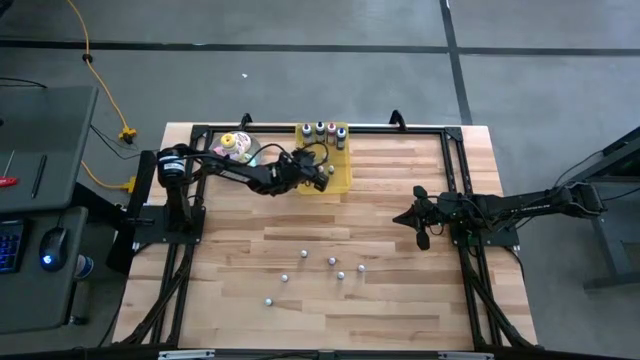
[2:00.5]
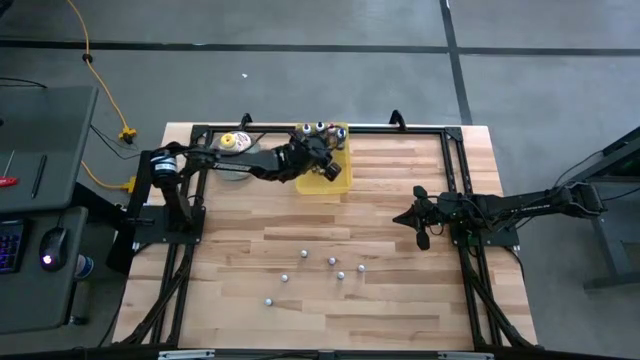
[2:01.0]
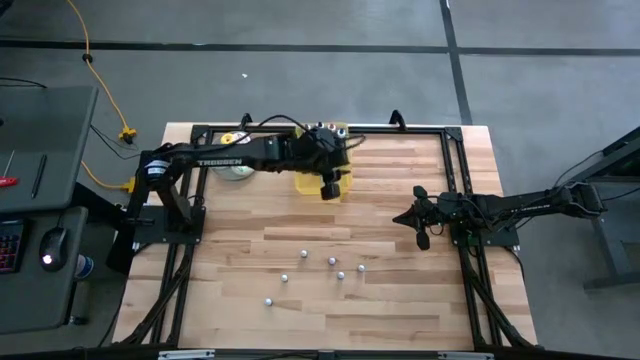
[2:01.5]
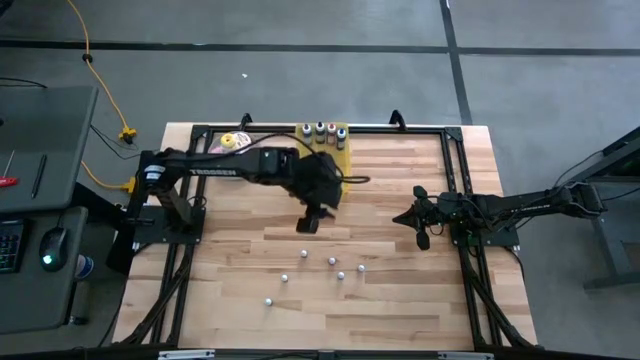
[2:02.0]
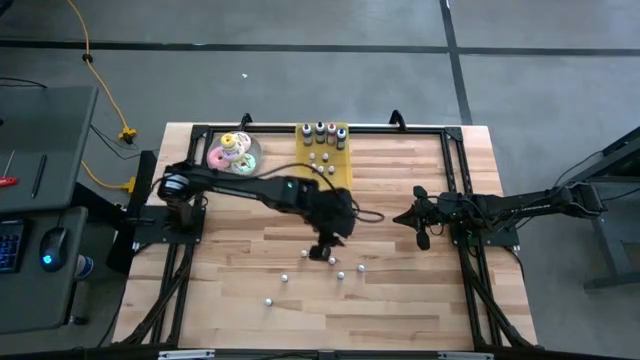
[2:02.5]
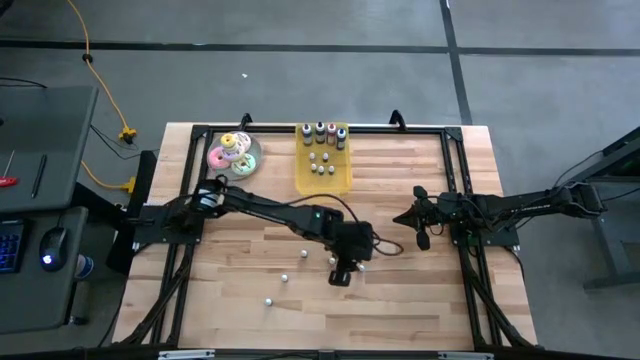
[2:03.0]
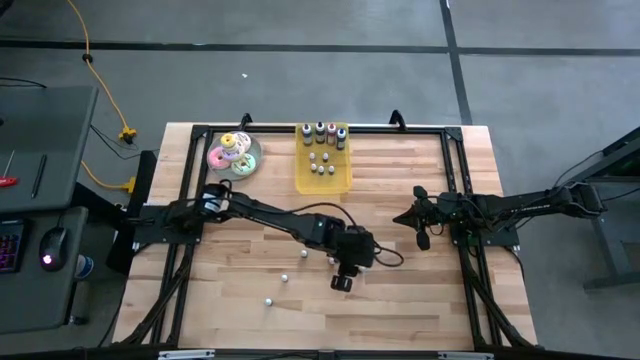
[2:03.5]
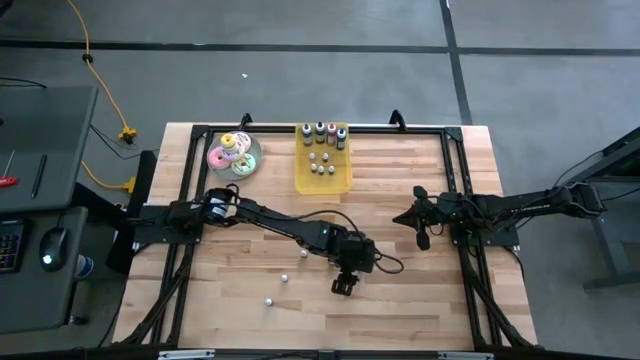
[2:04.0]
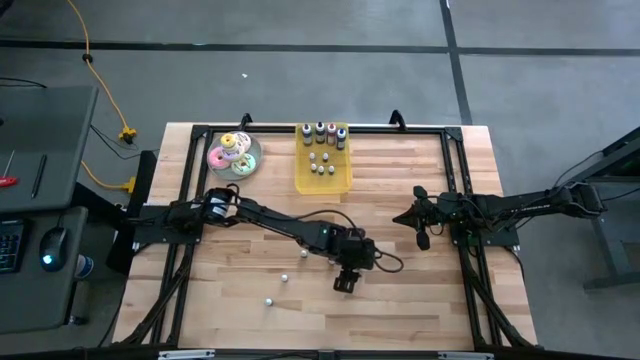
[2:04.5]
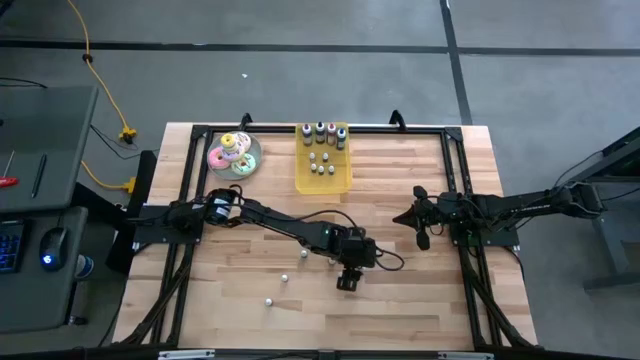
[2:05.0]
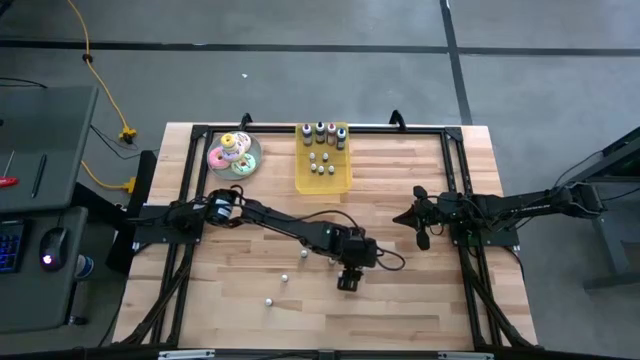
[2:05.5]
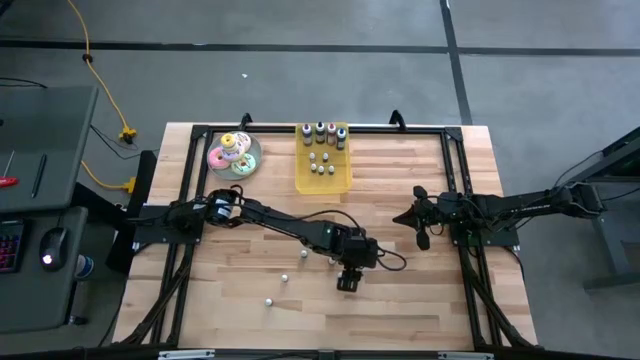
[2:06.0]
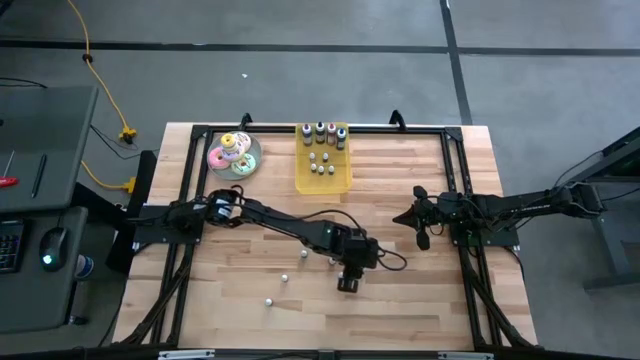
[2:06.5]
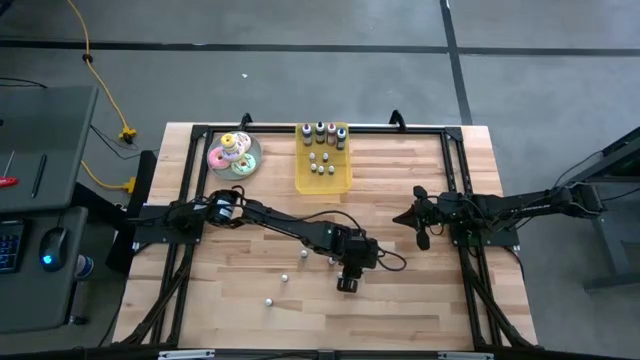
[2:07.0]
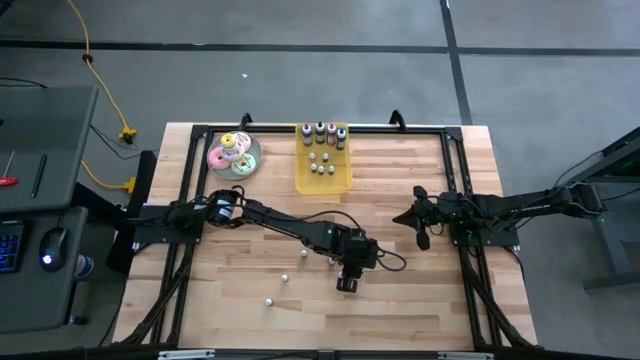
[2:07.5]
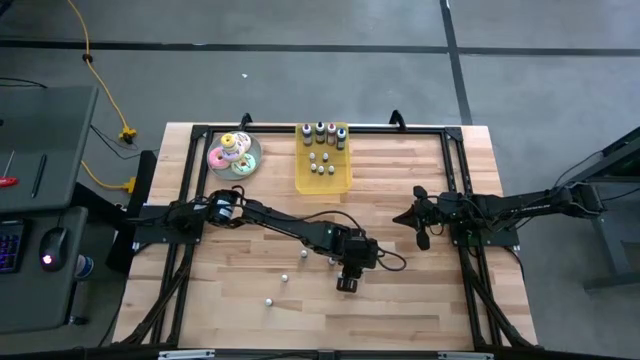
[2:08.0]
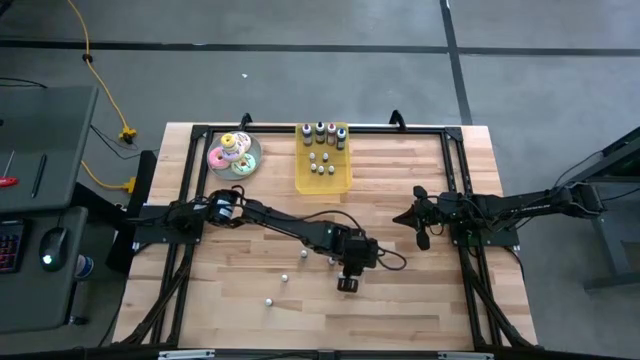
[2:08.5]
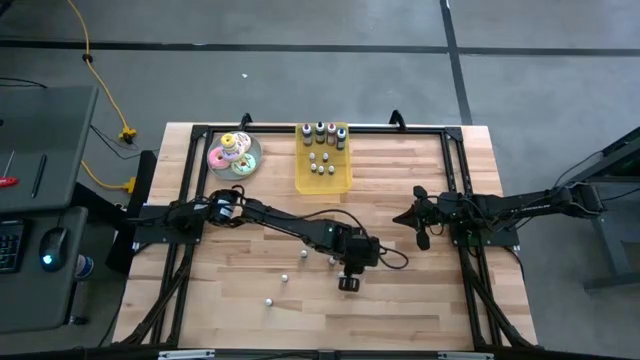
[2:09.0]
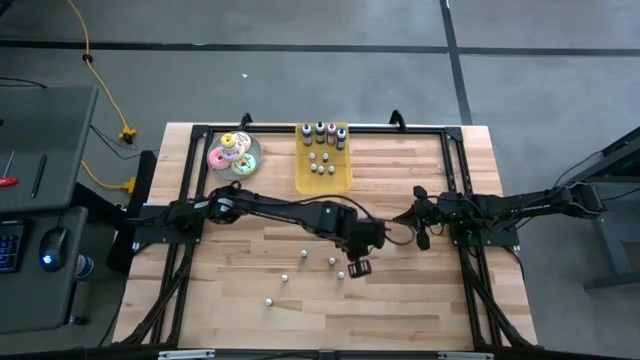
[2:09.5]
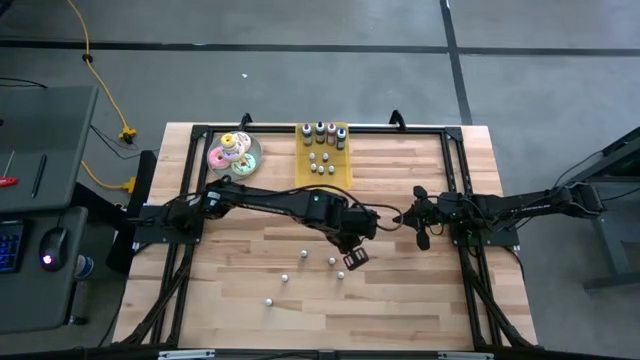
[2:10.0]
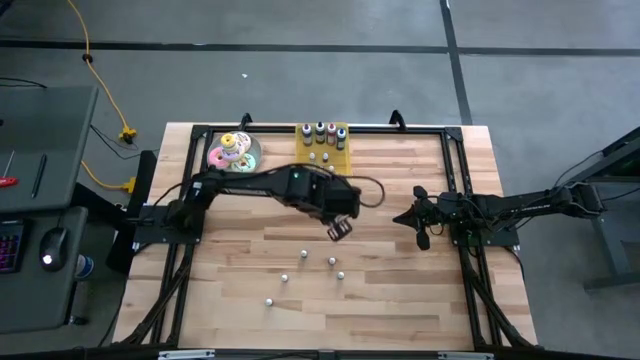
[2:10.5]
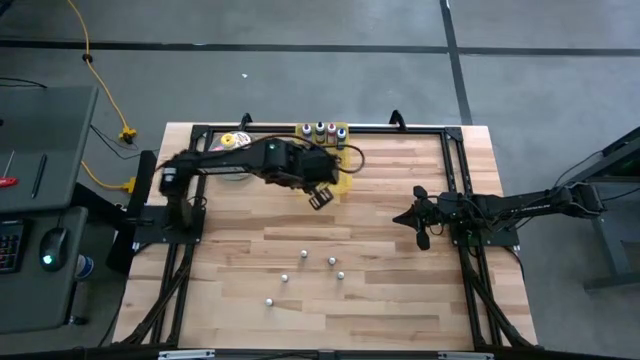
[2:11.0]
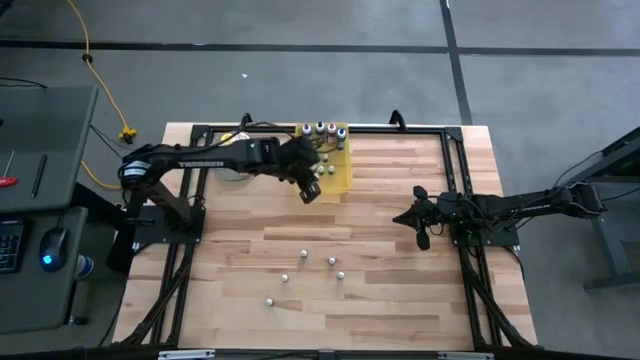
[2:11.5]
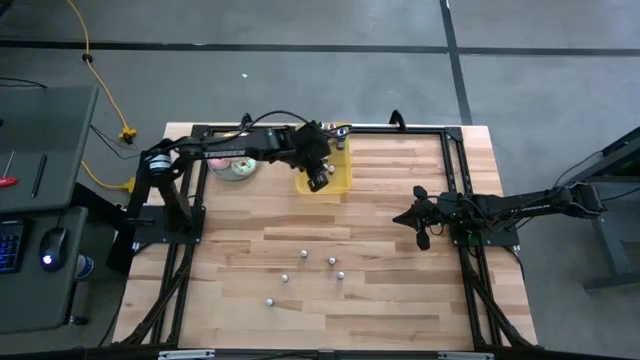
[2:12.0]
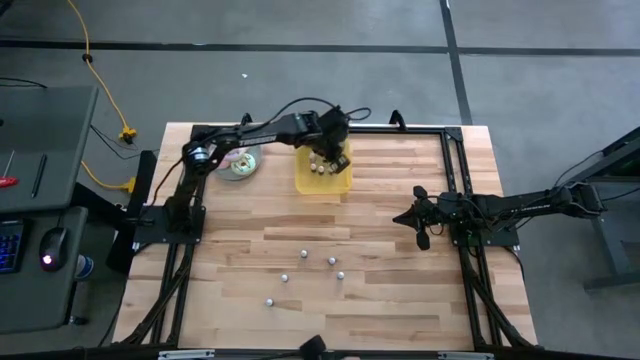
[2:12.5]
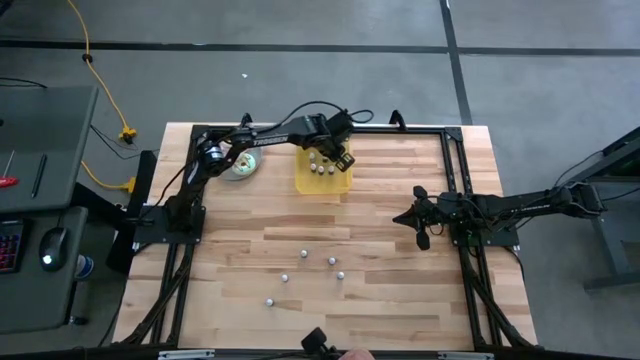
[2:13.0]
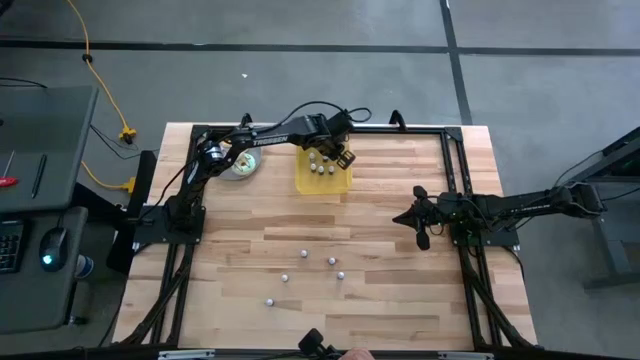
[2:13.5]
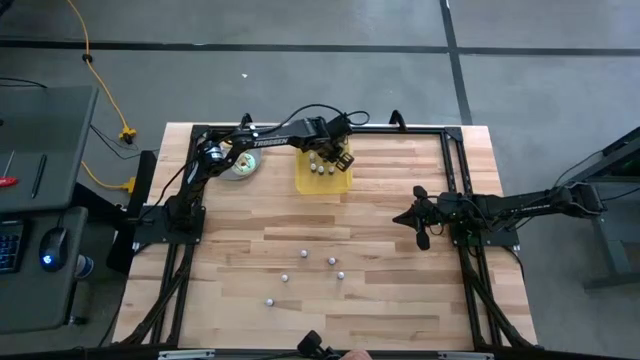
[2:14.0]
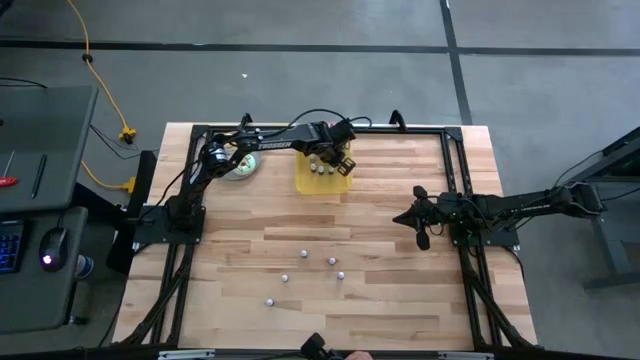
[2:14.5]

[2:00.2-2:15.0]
Task: Pick & Place food coloring
Put the bottom right small light green food coloring bottle into the yellow bin

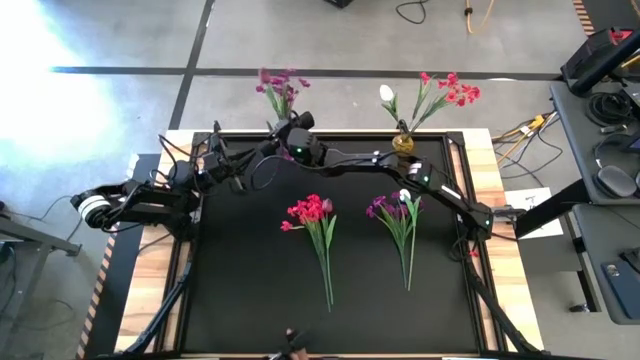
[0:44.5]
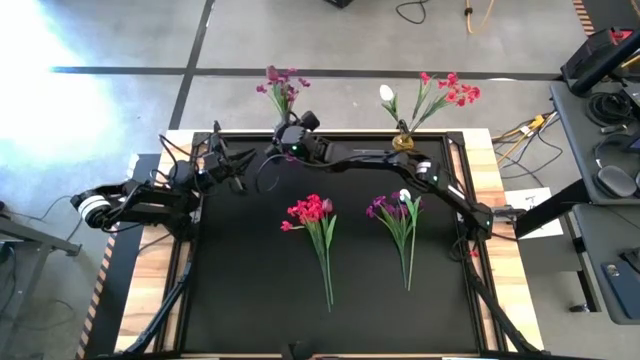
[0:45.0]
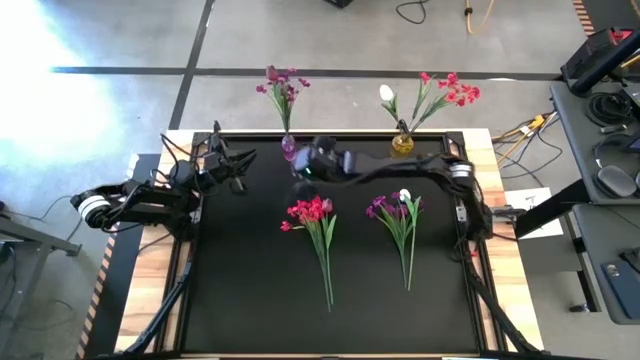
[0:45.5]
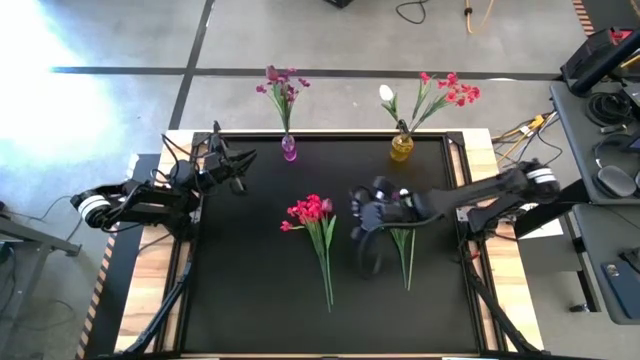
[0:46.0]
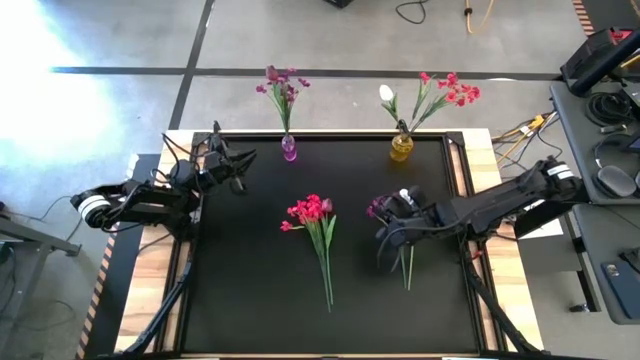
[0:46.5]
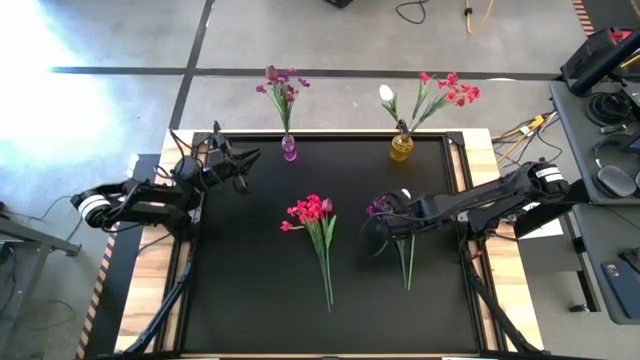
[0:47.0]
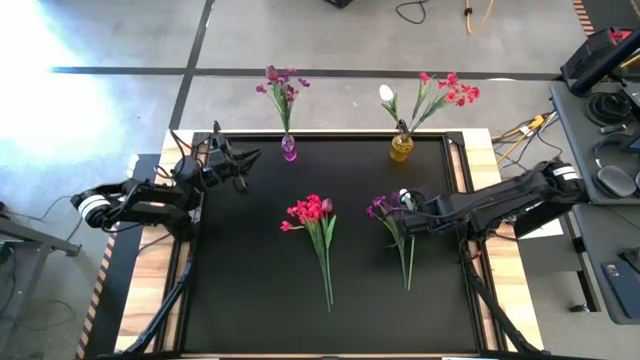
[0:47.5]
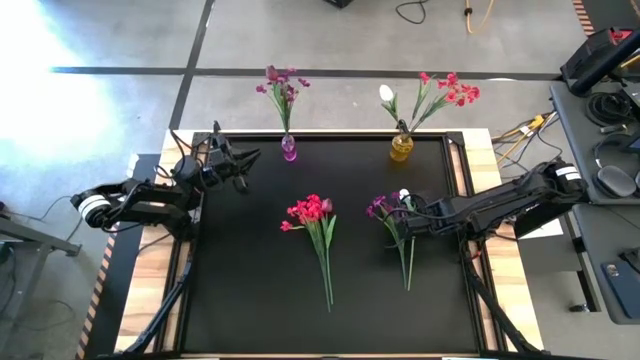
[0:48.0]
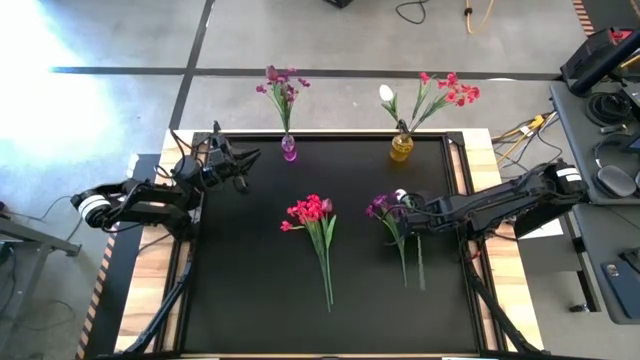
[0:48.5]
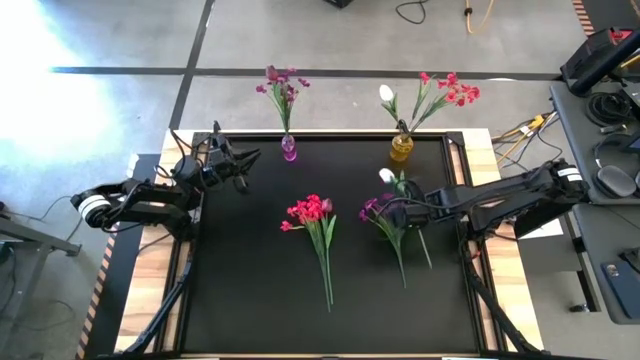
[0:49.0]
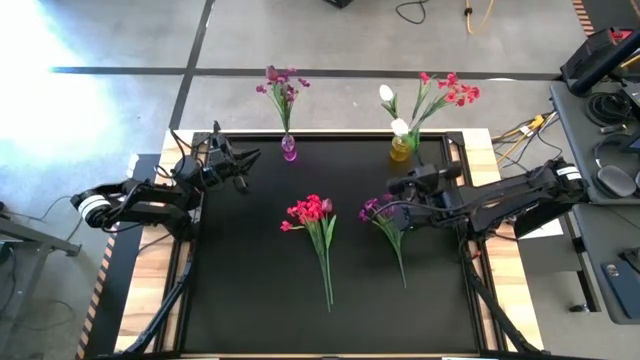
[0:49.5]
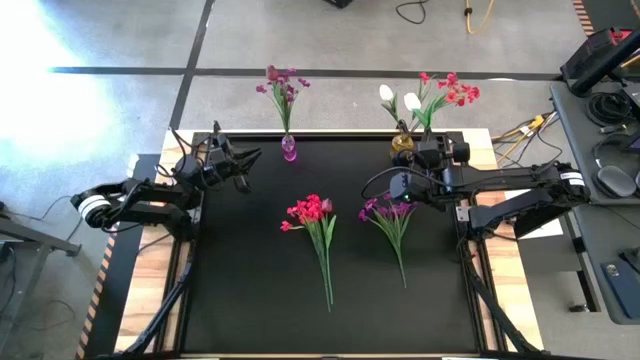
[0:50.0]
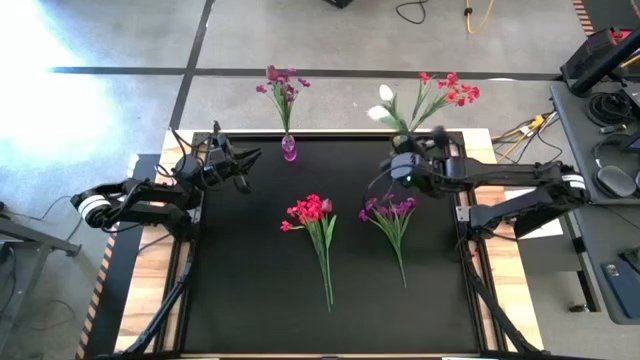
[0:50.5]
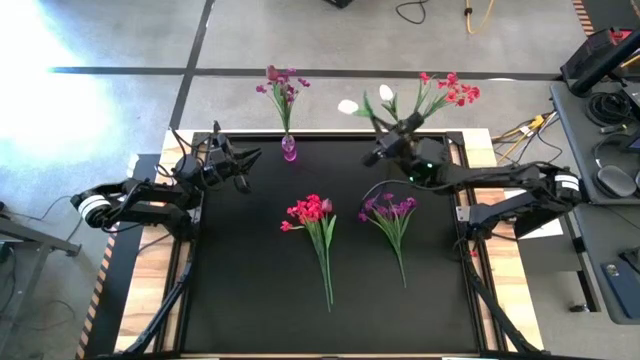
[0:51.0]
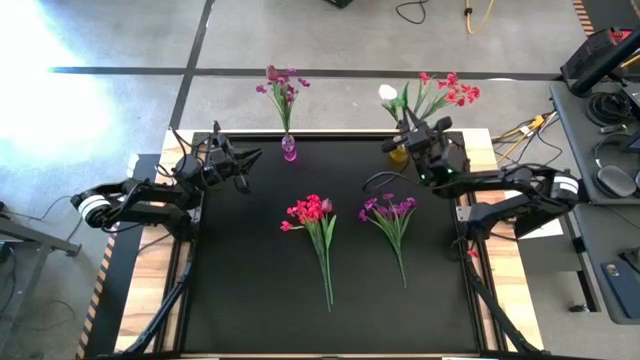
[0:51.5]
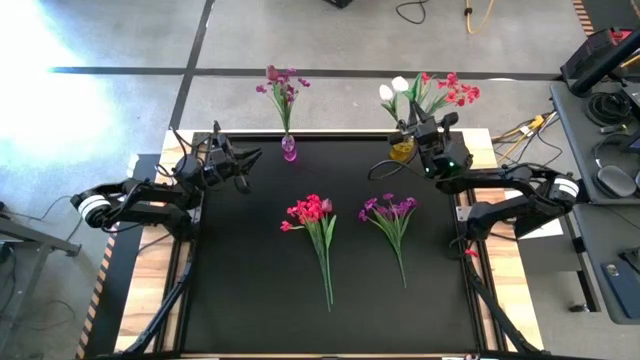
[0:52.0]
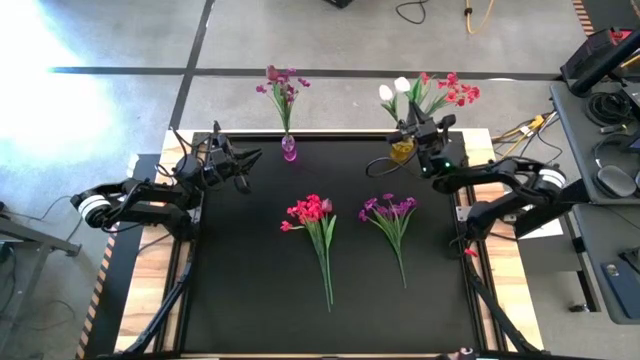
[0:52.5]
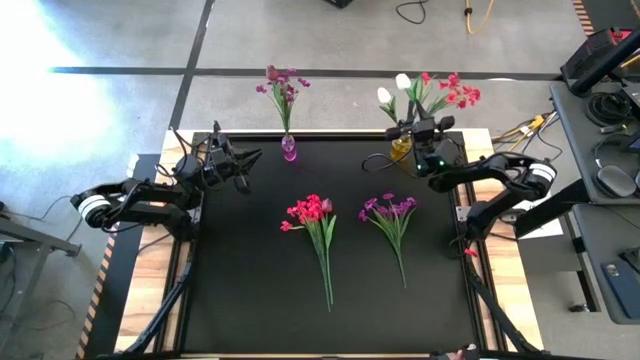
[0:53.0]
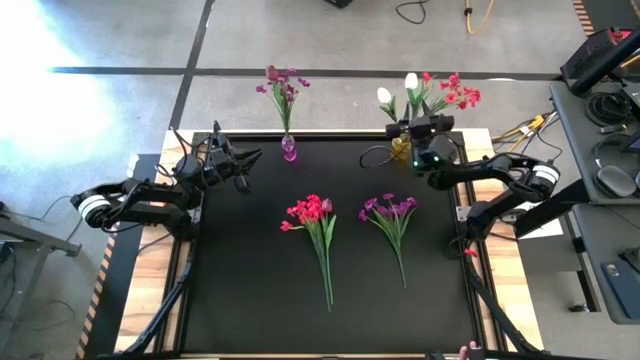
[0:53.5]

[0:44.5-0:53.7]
Task: Sort flowers into vase by color
Put the white flower into the yellow vase
